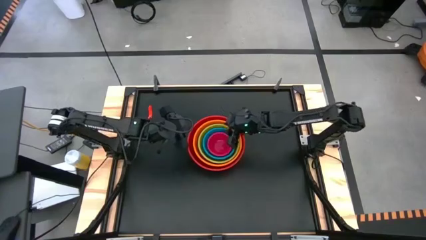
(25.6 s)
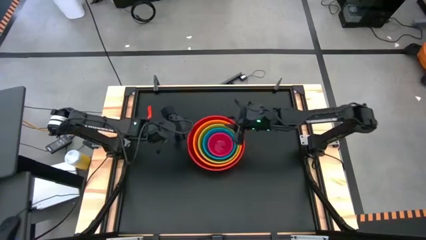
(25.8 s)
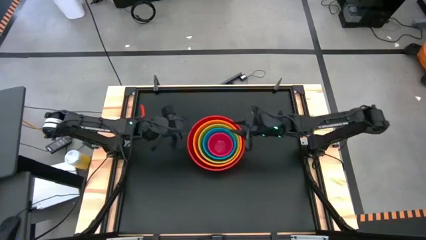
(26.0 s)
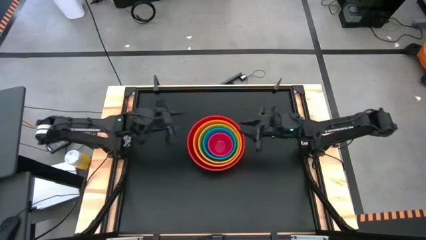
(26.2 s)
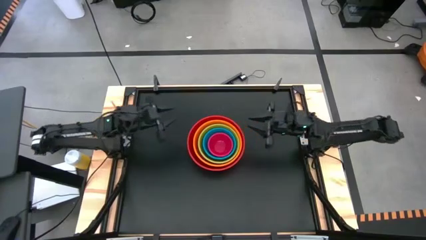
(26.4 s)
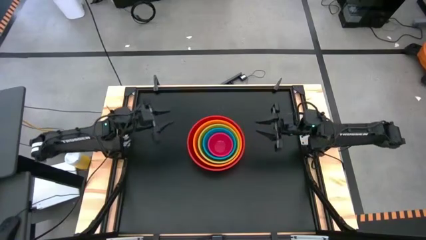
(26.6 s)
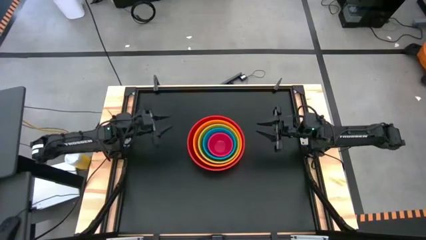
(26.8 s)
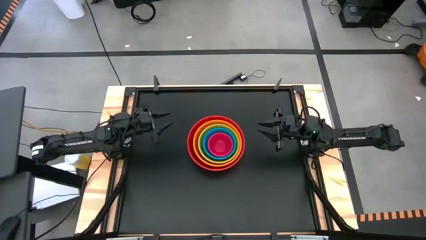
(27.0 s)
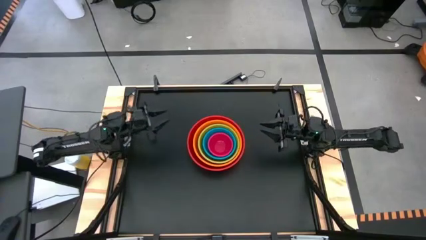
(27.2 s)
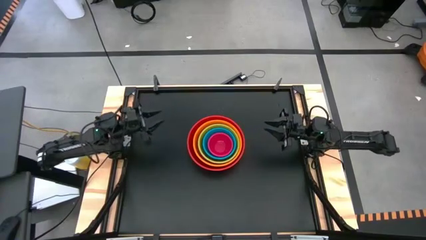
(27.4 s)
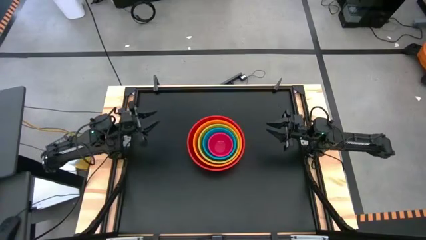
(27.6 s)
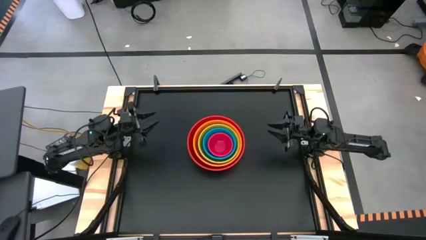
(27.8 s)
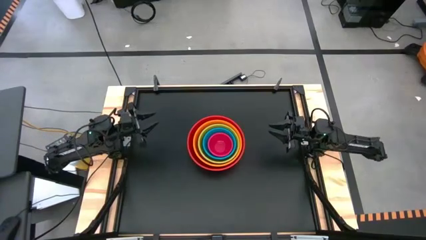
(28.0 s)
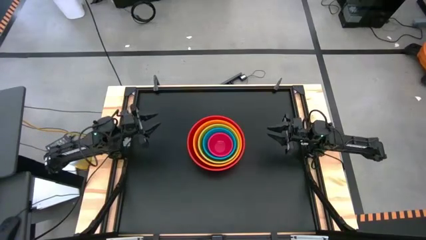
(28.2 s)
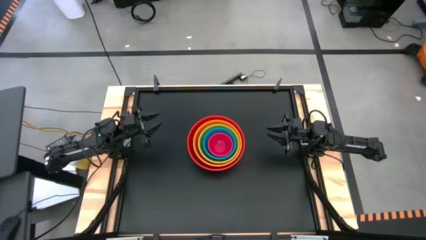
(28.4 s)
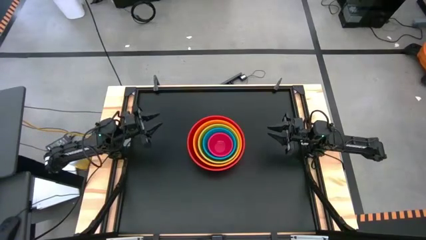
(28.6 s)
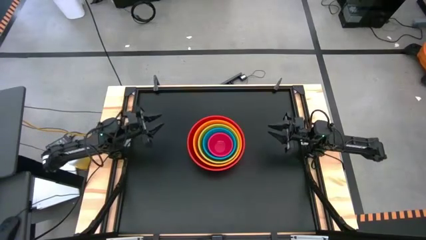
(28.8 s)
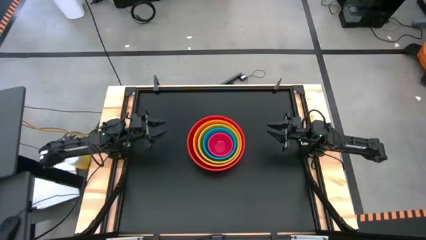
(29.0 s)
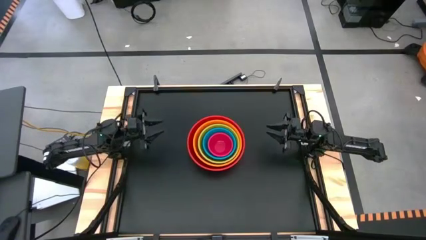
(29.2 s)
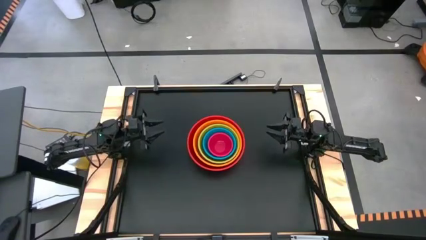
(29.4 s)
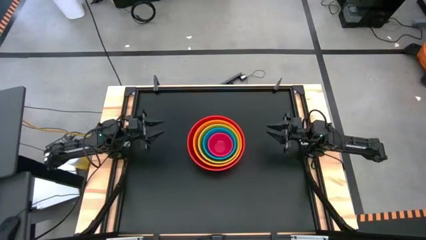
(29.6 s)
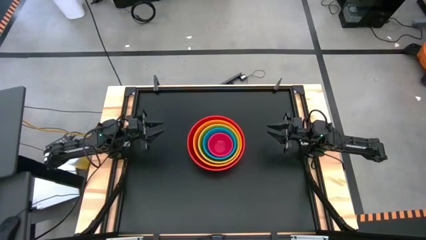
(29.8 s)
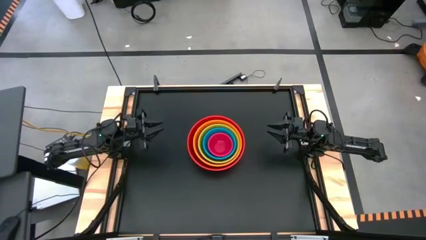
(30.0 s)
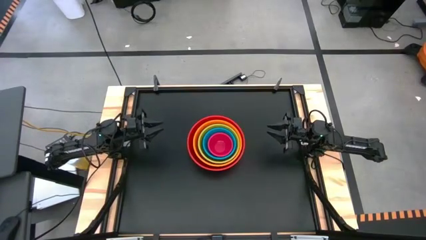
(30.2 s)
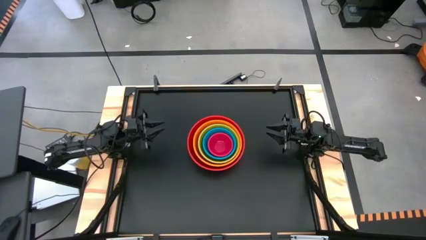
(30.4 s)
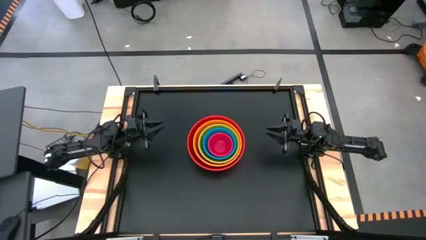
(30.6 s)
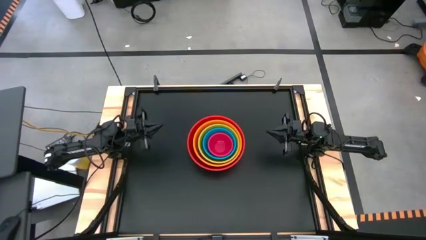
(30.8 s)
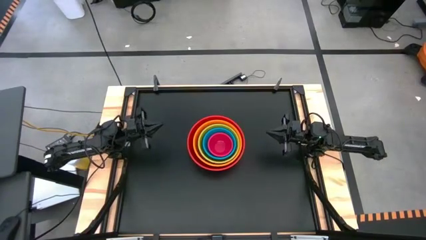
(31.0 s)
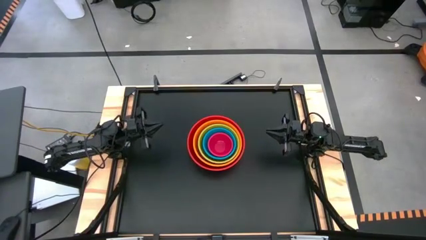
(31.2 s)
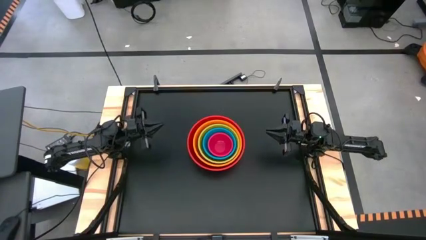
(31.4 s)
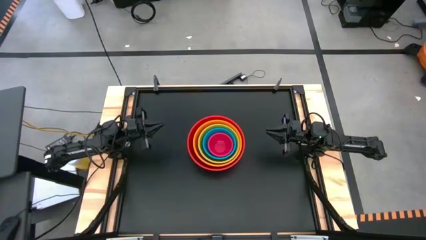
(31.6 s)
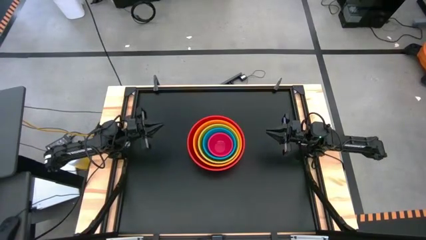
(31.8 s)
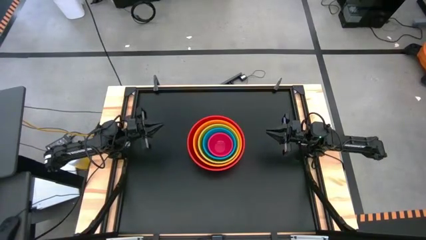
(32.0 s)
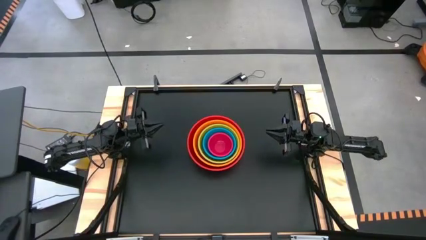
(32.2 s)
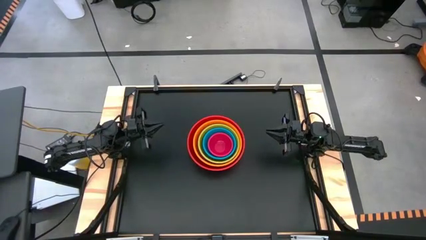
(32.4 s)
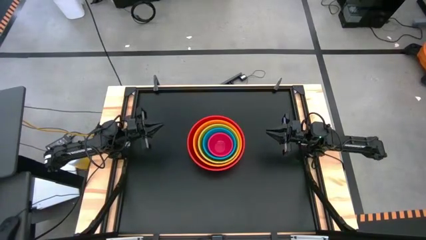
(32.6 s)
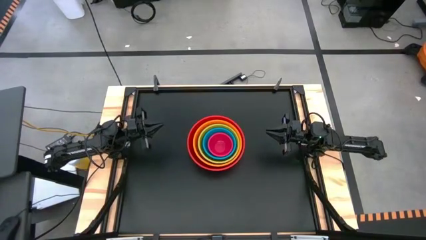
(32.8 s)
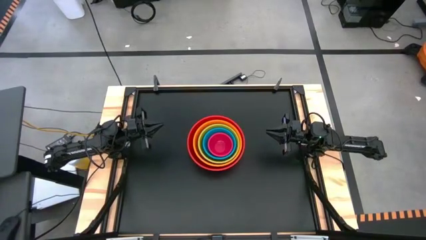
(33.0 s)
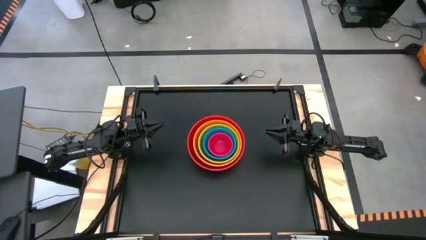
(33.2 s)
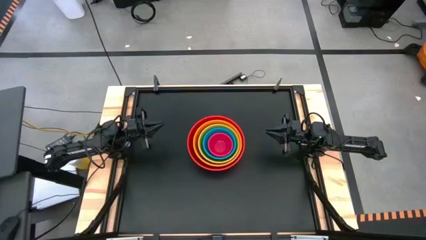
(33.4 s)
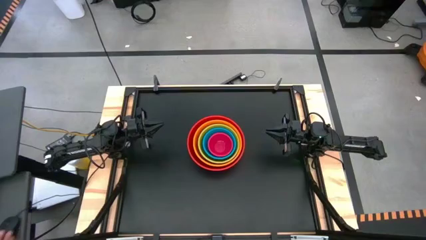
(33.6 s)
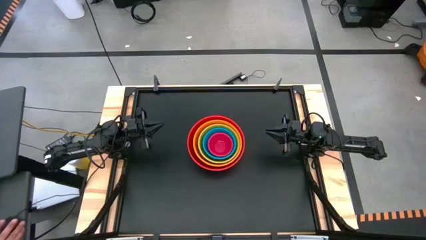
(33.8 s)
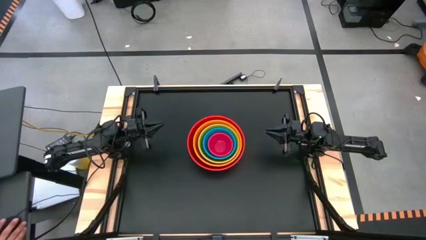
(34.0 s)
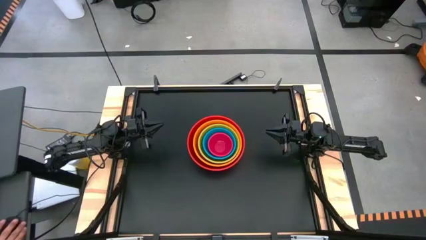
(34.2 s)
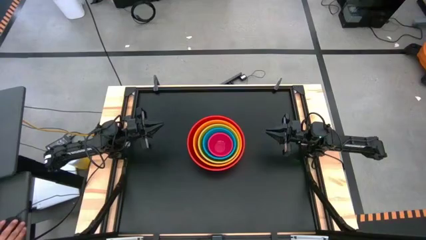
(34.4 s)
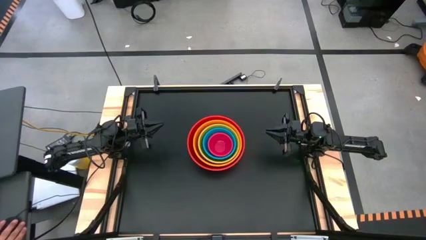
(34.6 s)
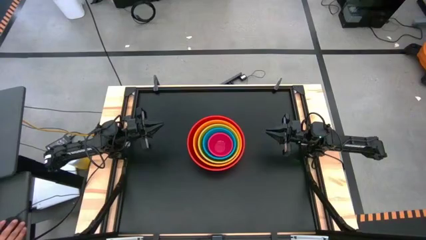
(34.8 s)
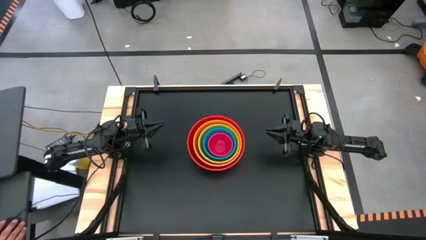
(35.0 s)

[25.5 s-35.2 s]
Return to Home Position
